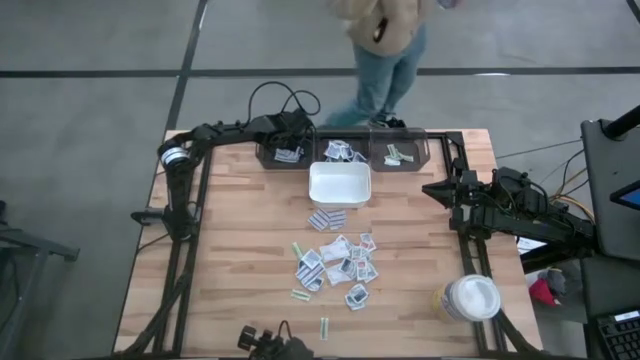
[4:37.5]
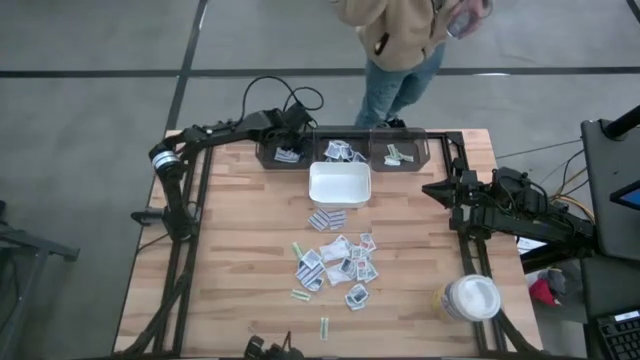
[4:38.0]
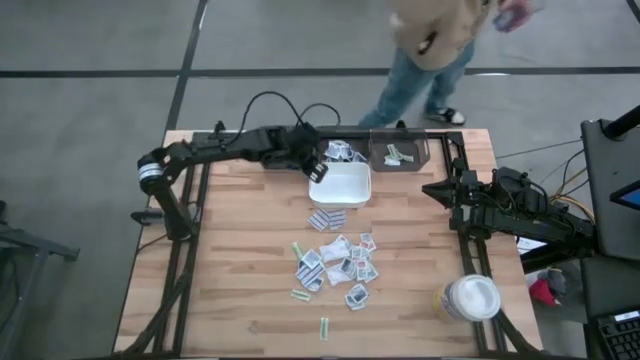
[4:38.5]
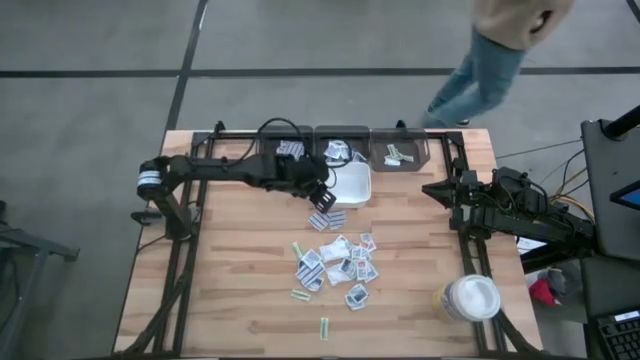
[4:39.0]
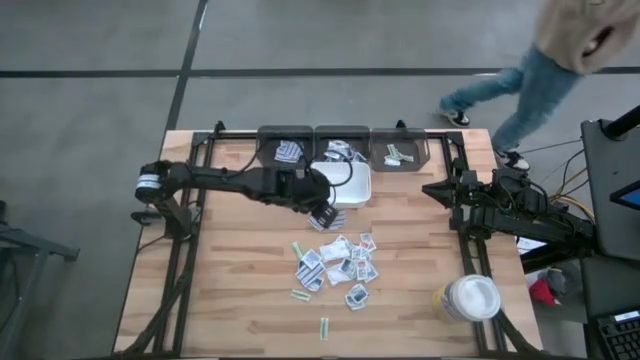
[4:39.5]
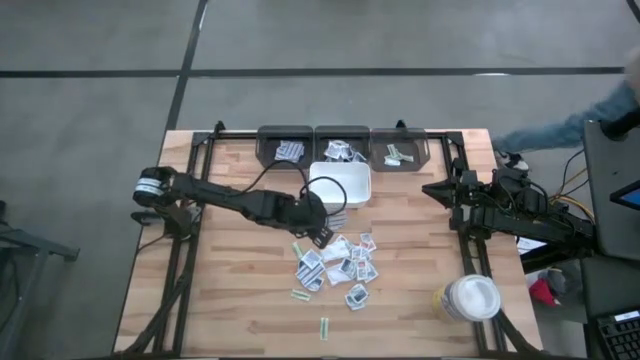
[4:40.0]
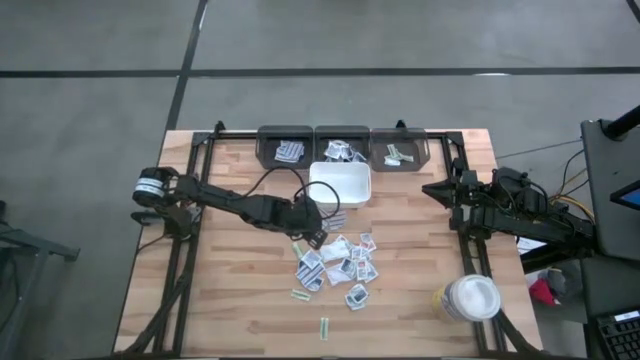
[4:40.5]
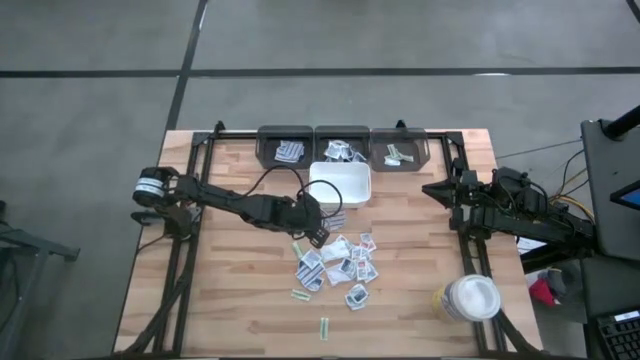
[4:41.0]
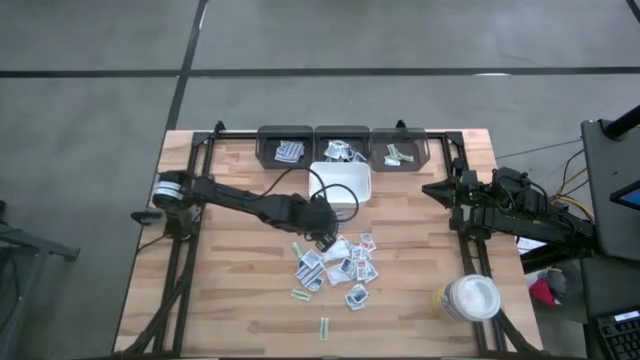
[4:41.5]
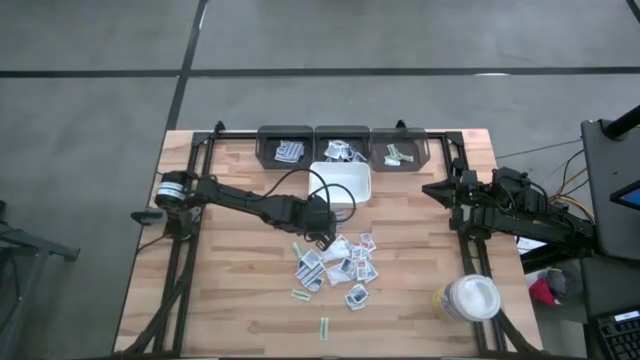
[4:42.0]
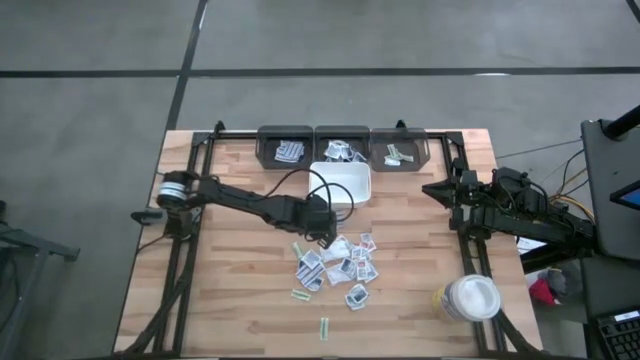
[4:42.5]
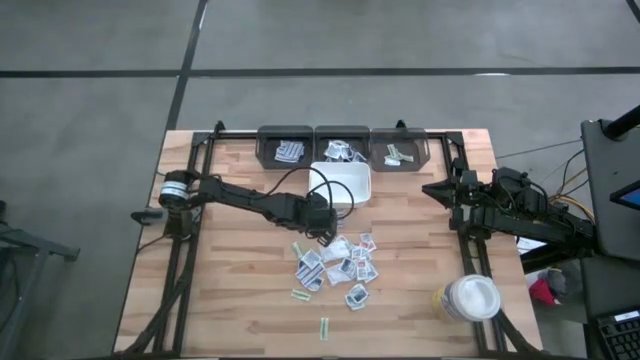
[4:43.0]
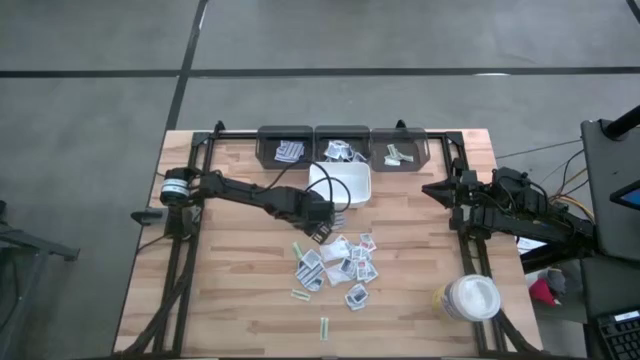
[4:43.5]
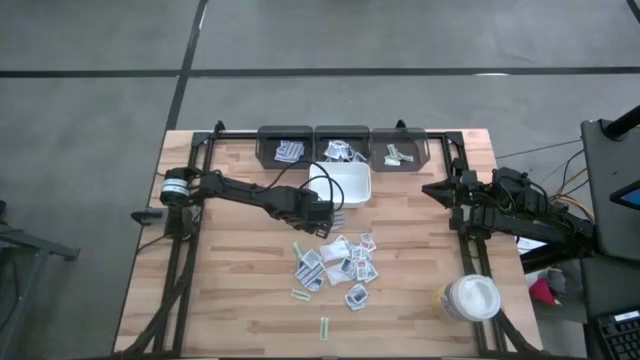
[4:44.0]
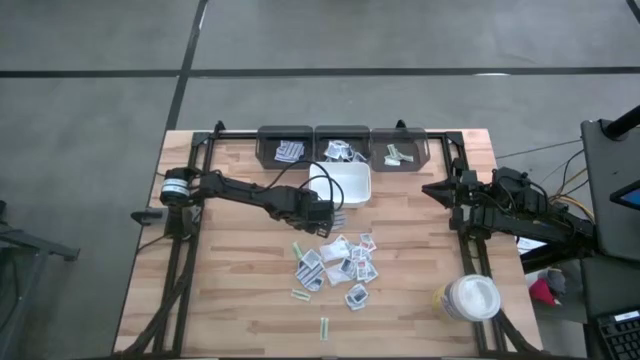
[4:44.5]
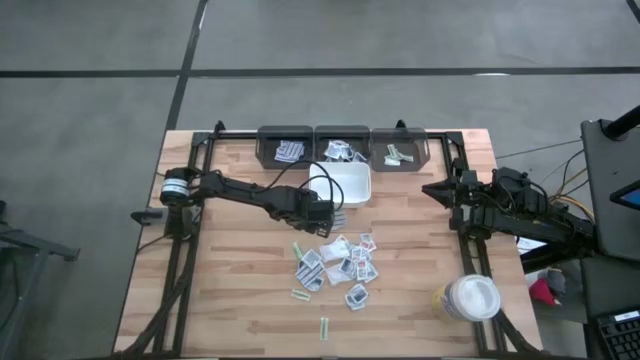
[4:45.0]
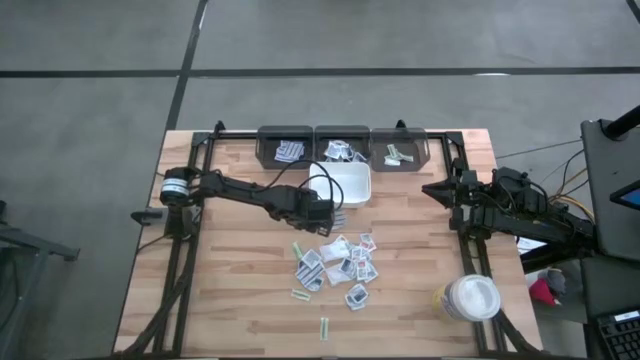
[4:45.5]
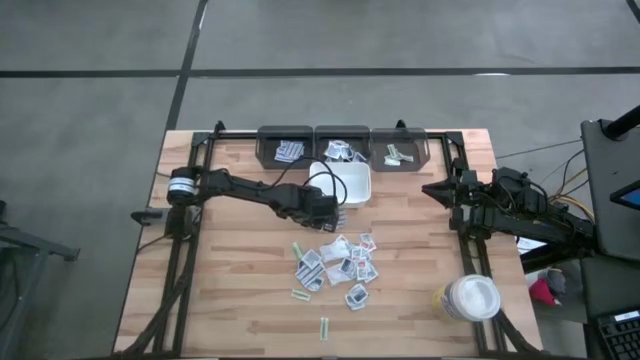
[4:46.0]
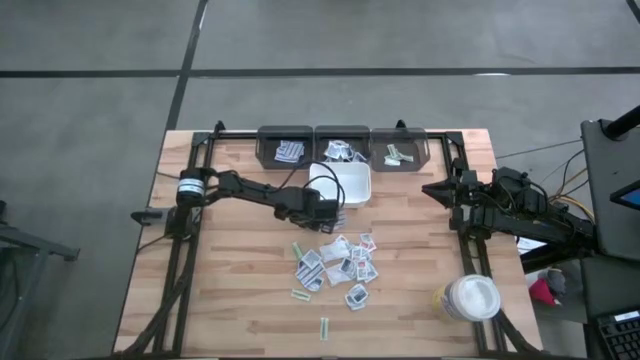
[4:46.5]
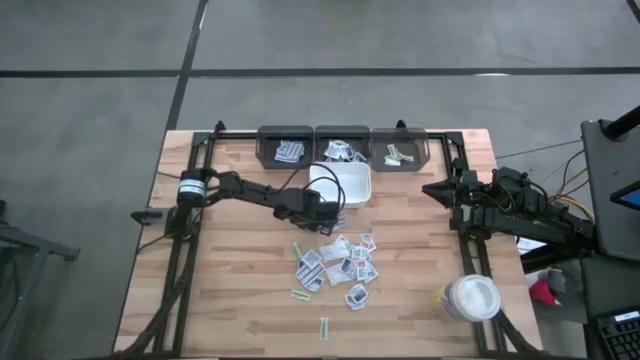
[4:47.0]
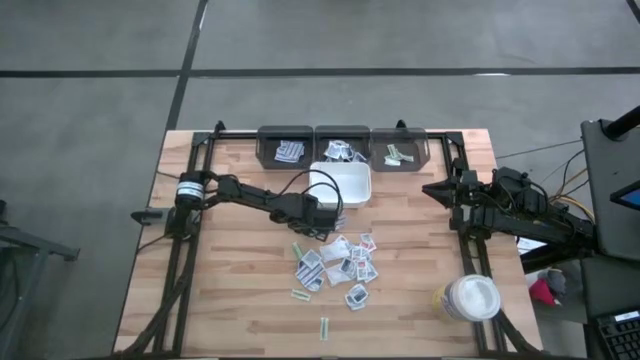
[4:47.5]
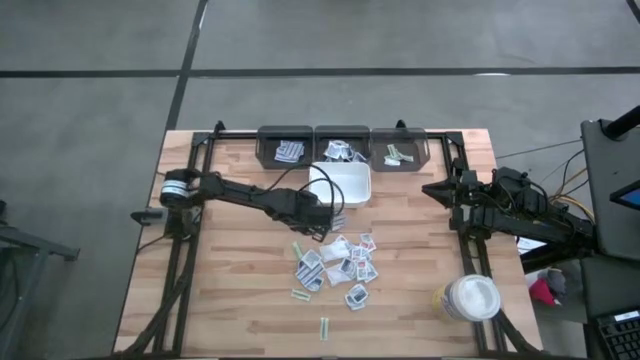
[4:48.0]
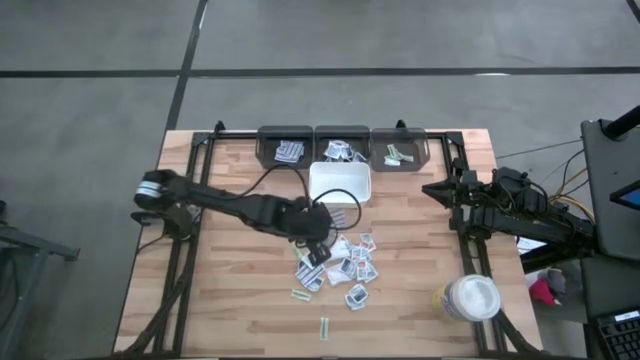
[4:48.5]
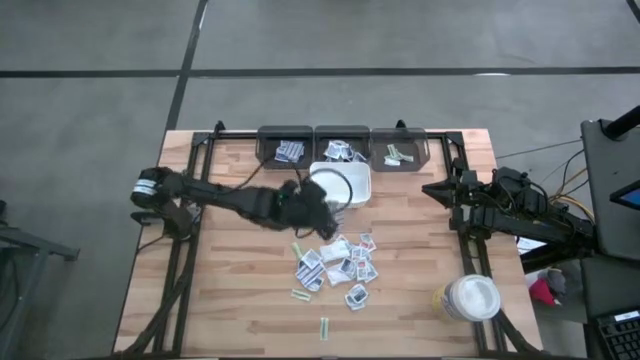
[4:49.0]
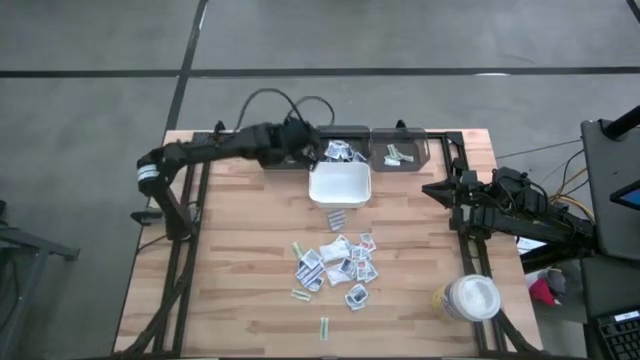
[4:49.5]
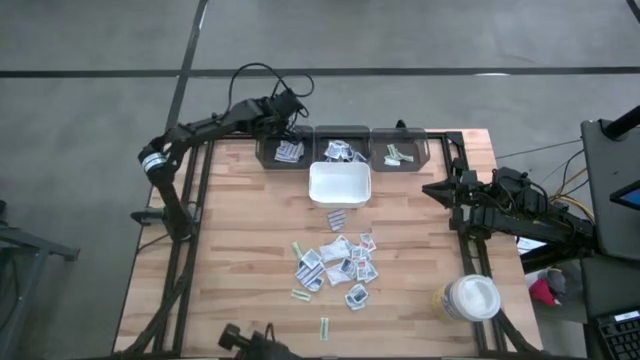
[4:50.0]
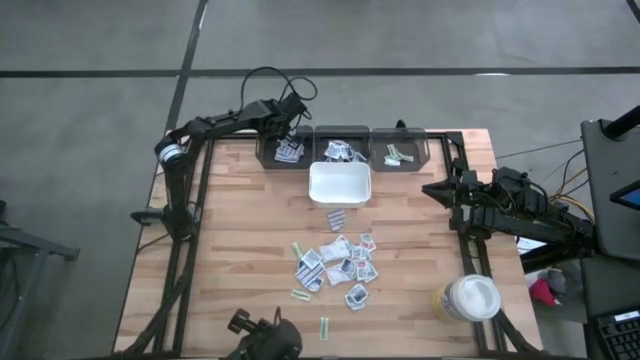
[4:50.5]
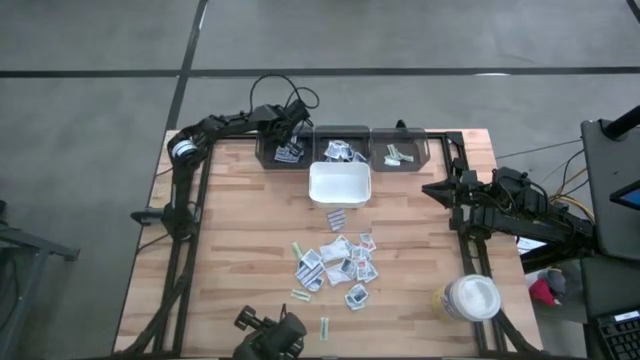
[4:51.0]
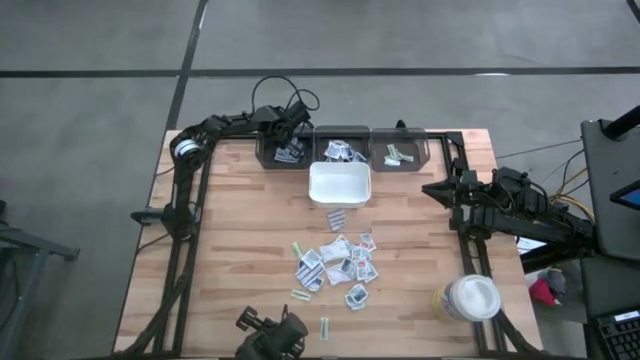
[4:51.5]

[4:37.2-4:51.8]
Task: Pick & Place First Aid Supplies
Put the blue bandage pack into the left gray bin

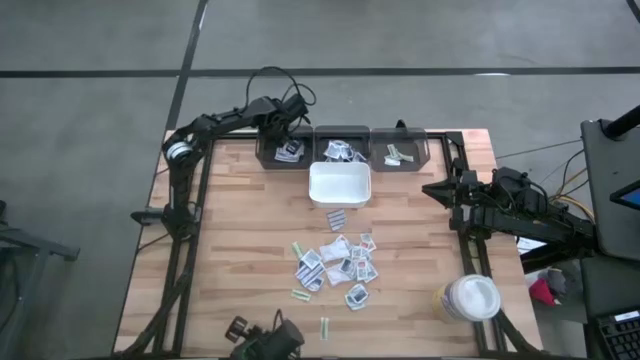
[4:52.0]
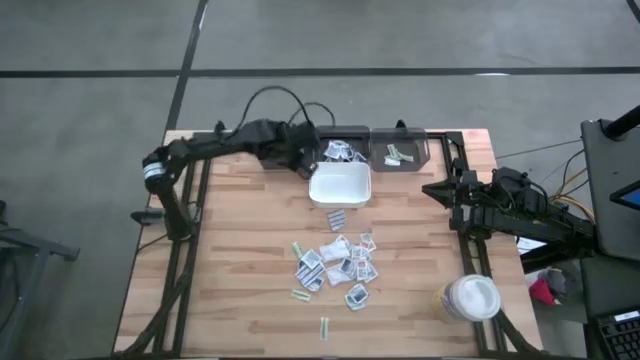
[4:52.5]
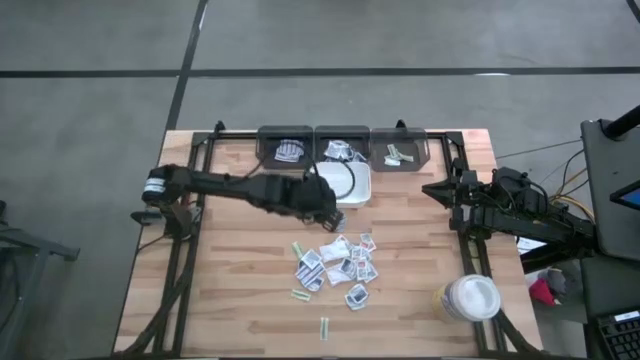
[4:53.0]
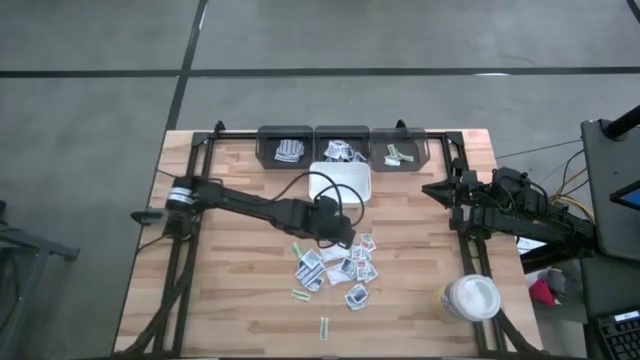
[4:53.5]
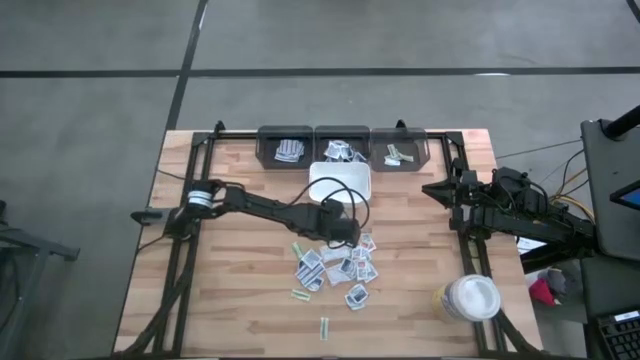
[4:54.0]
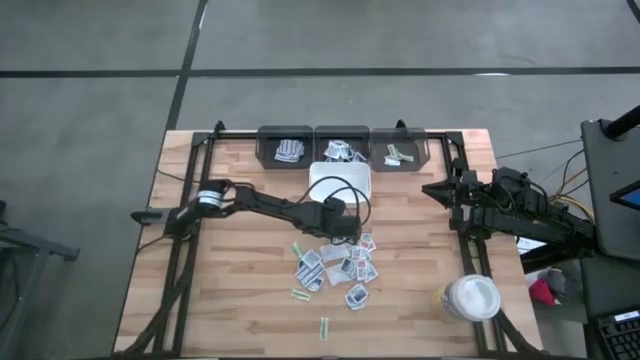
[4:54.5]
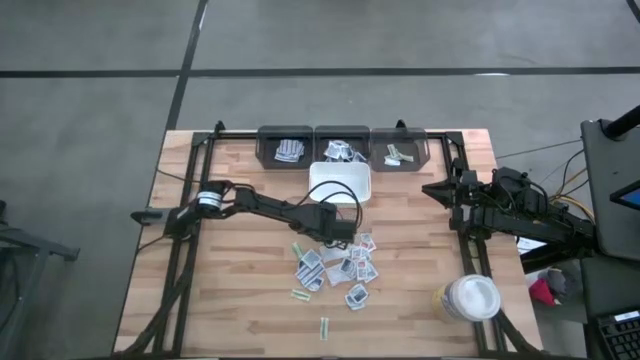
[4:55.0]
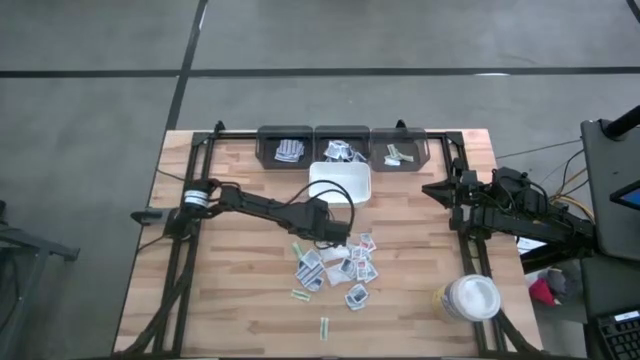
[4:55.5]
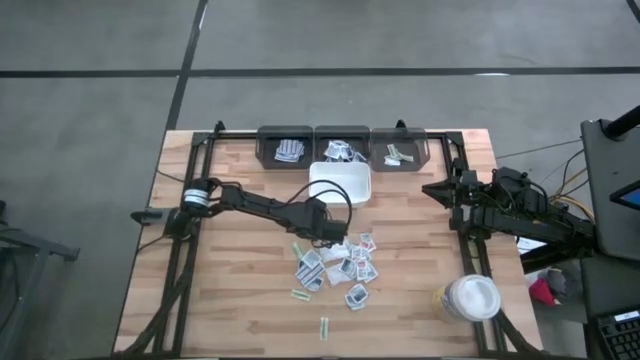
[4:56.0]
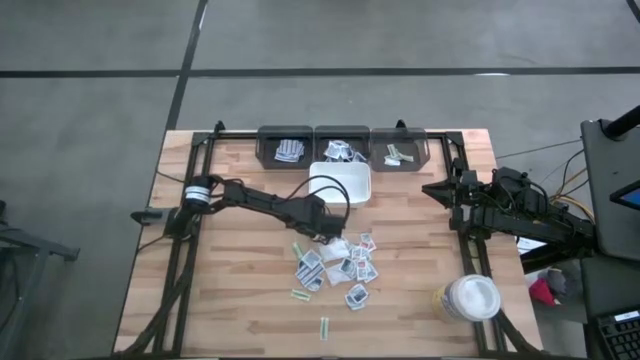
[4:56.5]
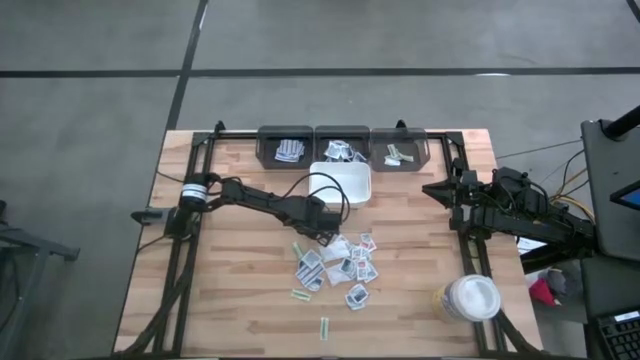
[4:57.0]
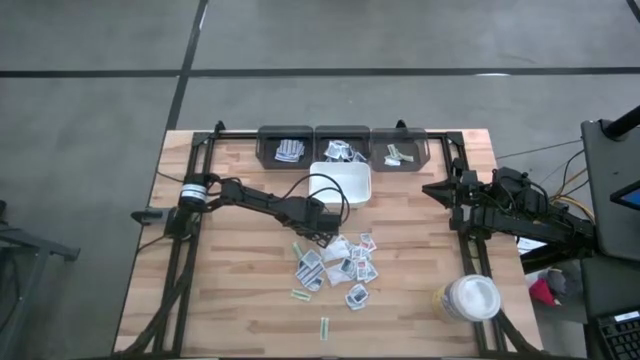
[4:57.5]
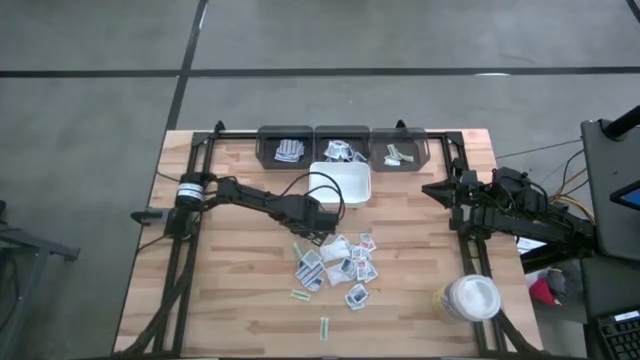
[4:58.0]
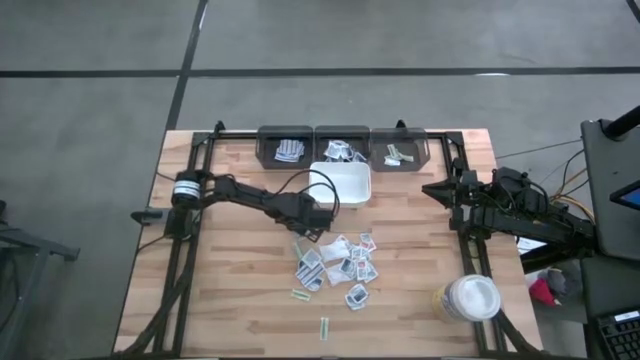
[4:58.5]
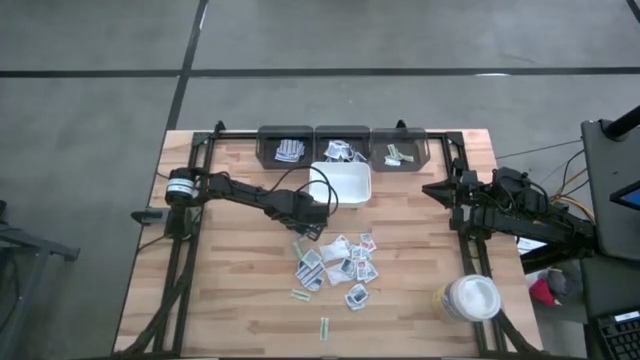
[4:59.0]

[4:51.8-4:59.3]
Put the blue bandage pack into the left gray bin

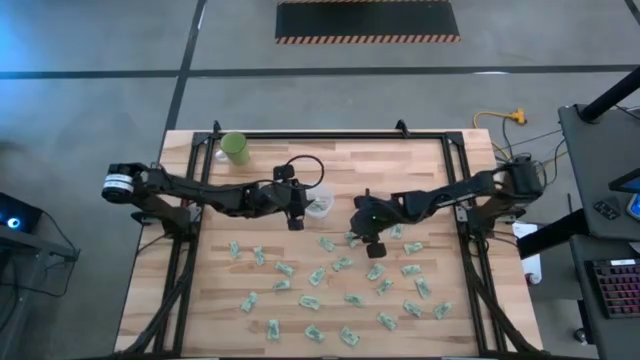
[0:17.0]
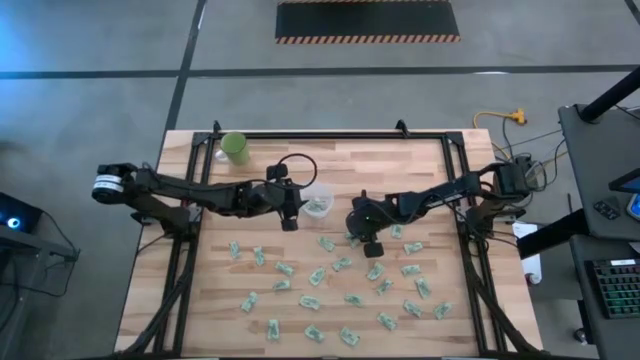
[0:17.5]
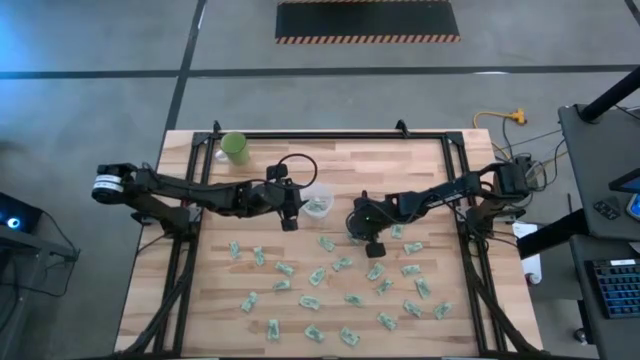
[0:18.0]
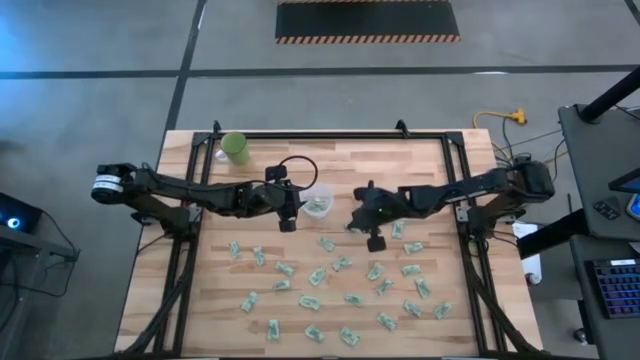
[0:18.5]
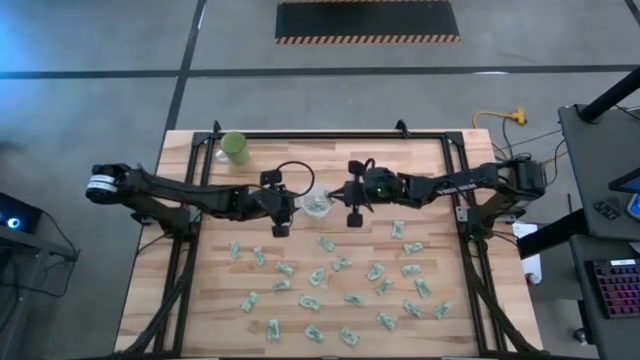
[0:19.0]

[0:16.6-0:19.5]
Task: Pick and place Stevia / Truvia into bins
Put the green stevia packet into the transparent container
